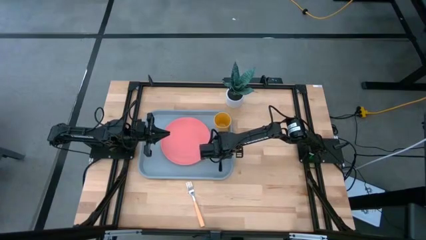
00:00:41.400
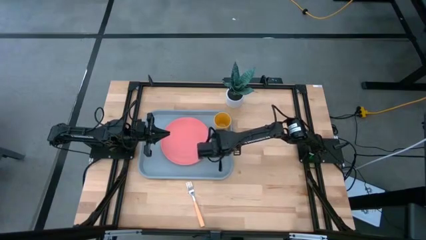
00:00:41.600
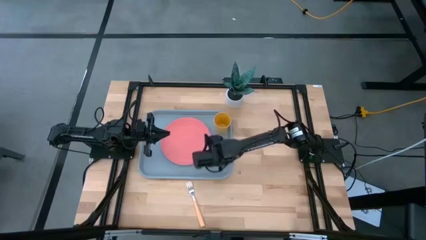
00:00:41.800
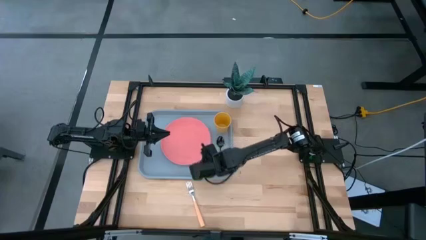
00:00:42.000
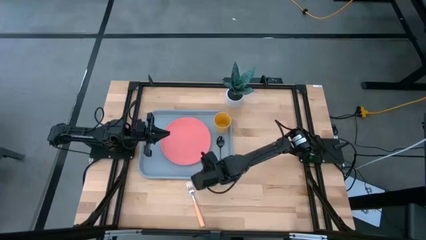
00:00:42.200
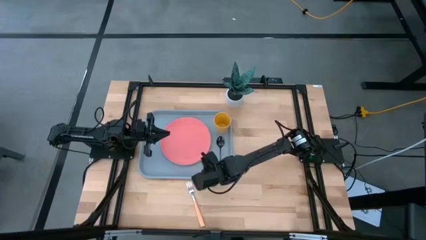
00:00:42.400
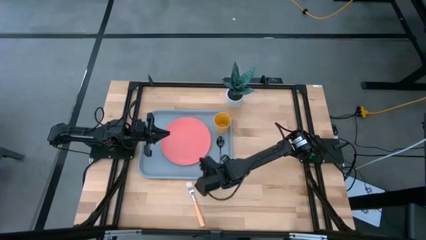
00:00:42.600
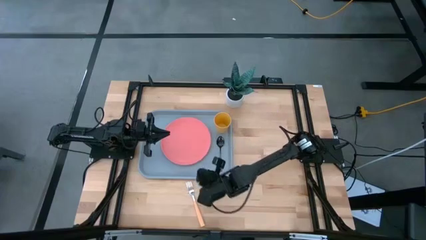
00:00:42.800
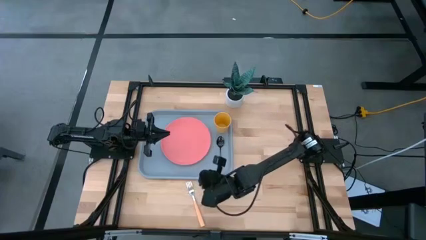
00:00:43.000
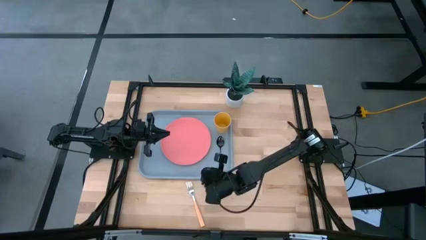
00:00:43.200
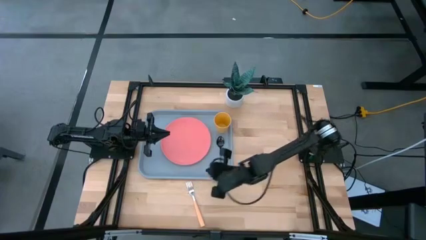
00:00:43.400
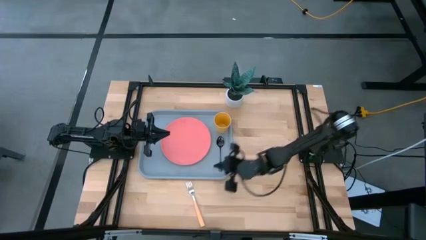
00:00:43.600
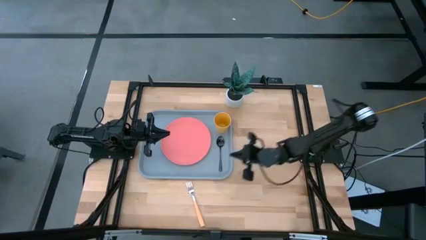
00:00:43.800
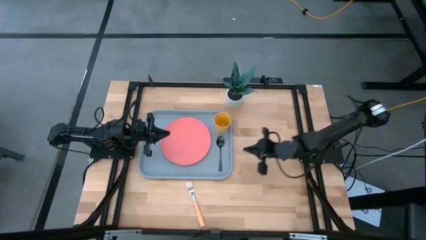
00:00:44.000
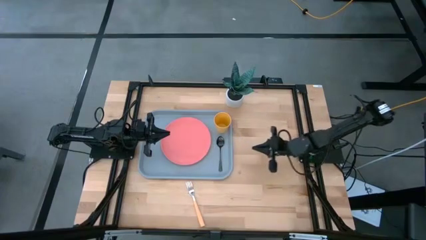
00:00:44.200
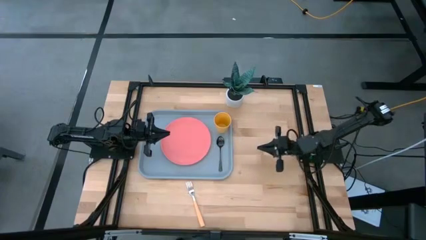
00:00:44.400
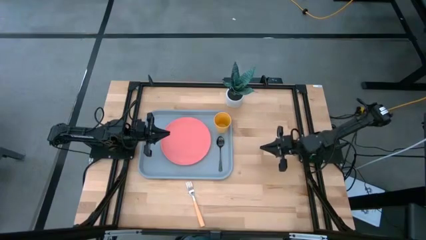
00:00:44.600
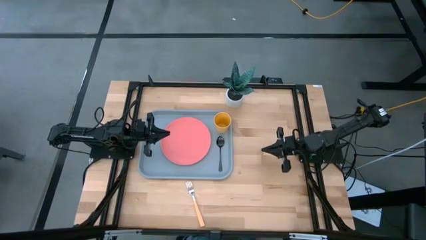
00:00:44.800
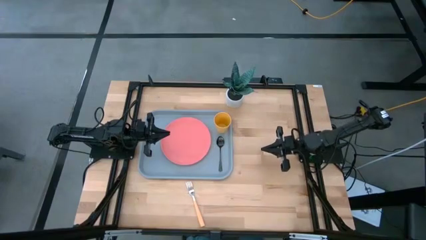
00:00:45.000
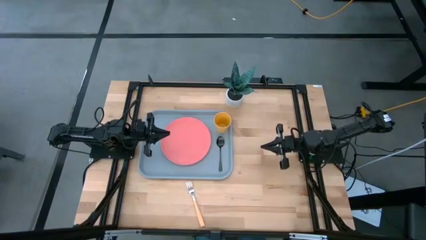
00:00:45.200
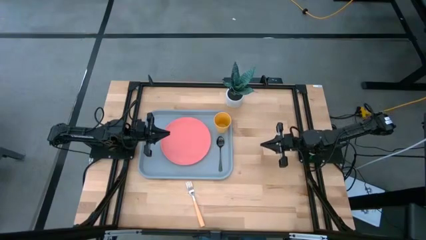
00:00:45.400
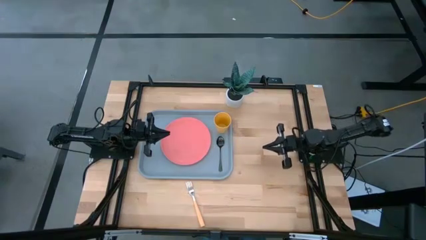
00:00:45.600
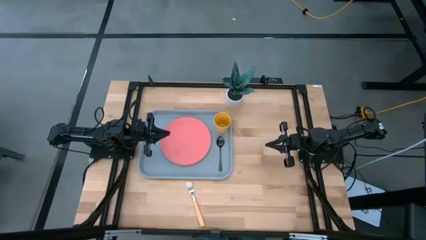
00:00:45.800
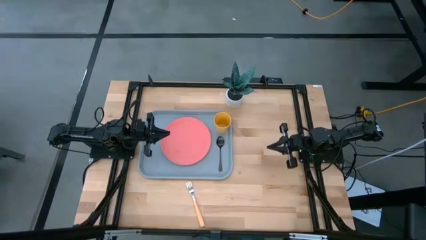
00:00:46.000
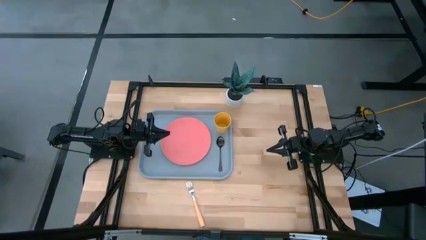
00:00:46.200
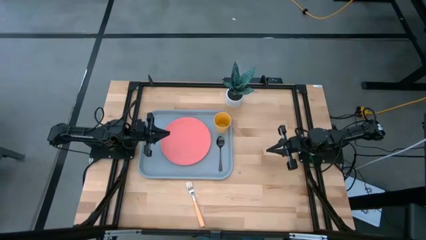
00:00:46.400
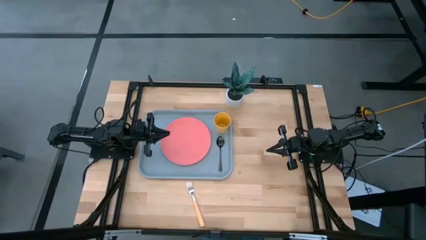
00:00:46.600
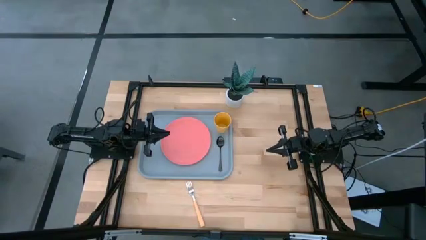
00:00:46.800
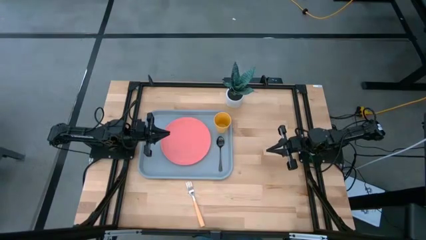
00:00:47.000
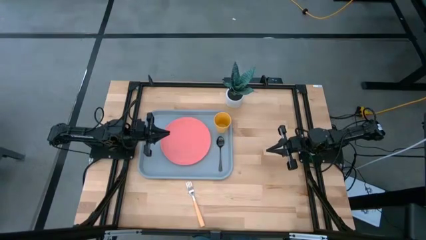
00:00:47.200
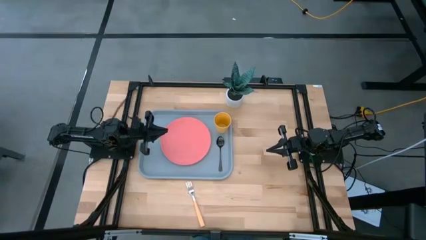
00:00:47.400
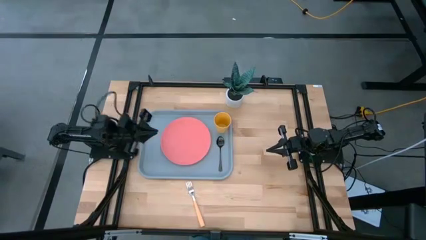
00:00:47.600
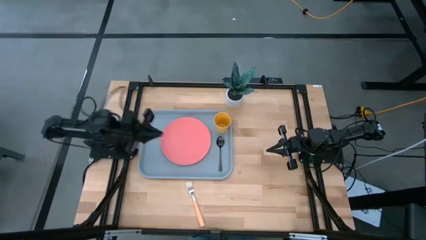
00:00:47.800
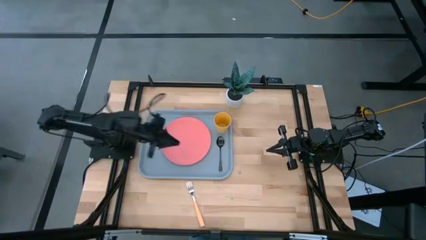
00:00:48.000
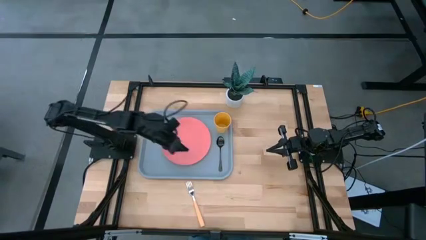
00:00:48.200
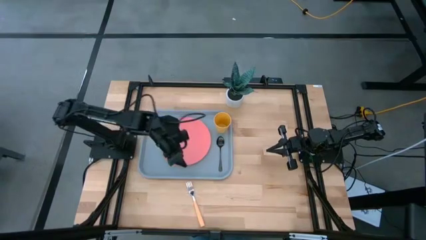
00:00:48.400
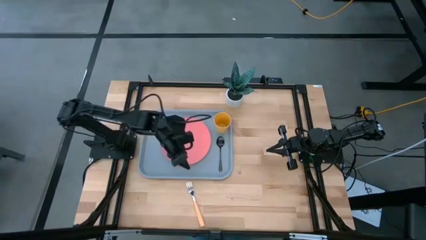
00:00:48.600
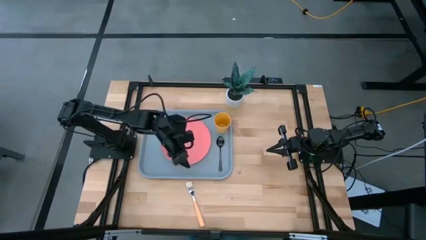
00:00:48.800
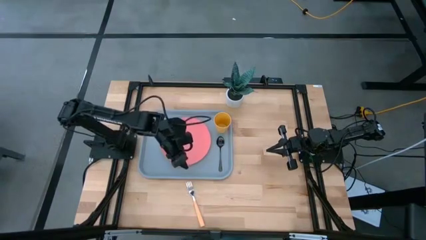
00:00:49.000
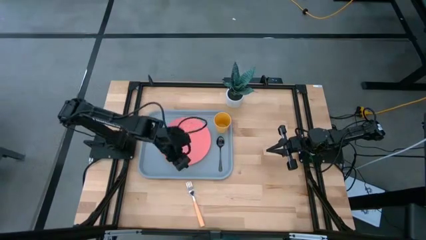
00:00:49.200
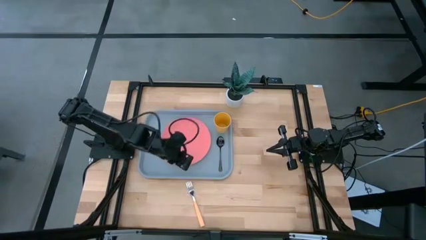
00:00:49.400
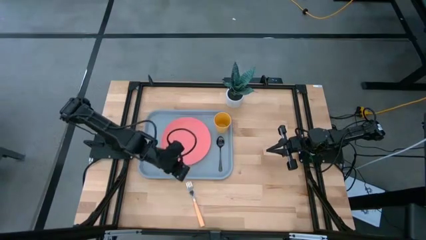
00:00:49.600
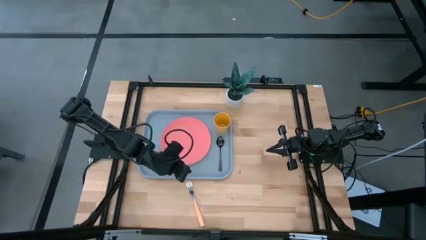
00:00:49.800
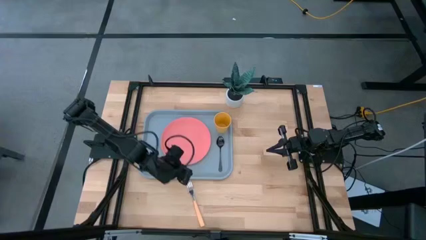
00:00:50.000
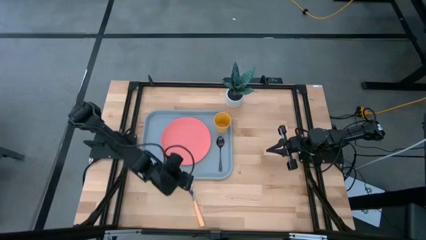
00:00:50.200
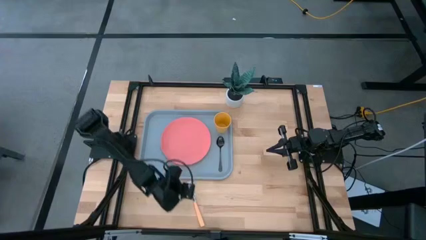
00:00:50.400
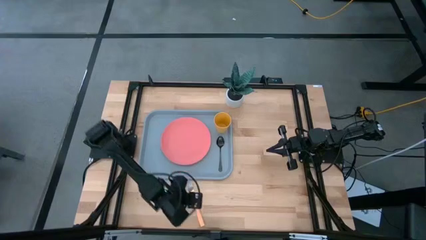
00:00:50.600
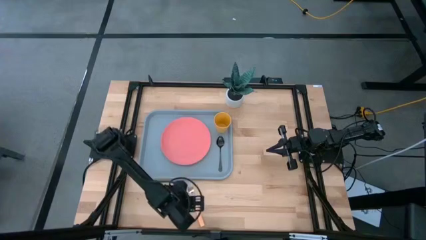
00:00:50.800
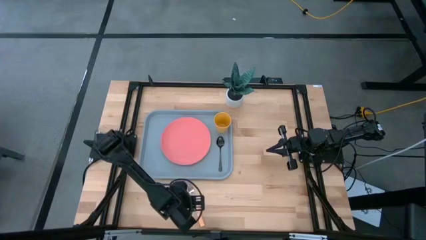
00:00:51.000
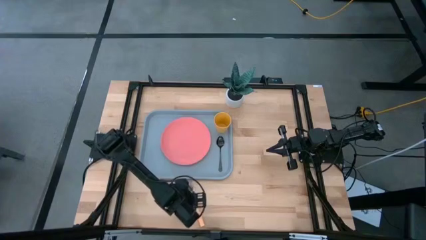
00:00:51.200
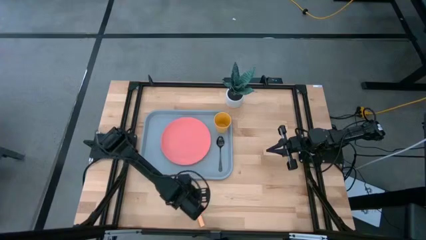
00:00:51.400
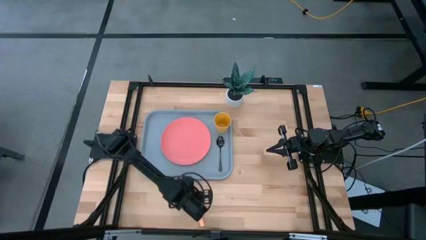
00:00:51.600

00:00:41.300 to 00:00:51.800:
Task: Pick and place plate/cup/fork/spoon on tray
Put the yellow fork on the gray tray
